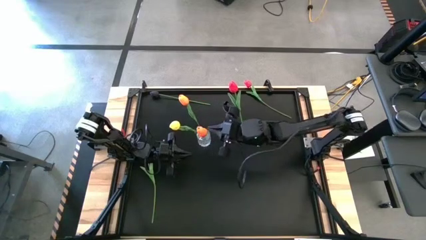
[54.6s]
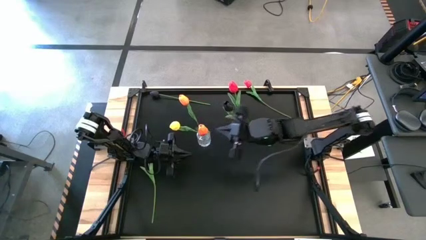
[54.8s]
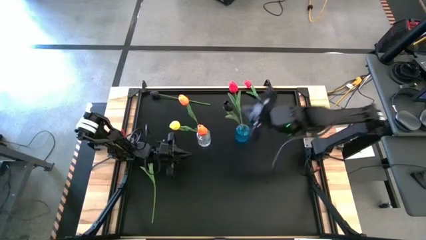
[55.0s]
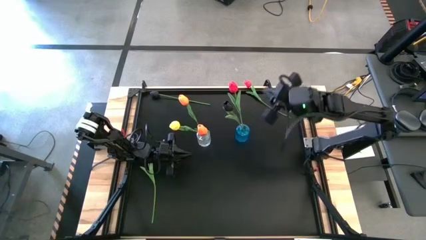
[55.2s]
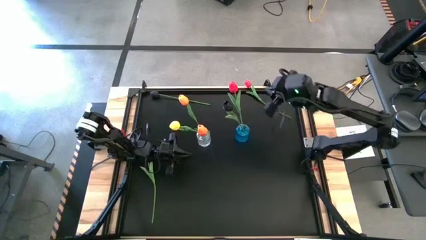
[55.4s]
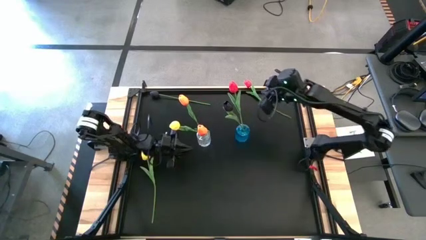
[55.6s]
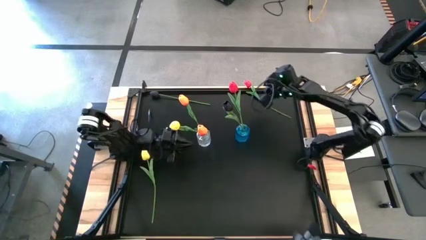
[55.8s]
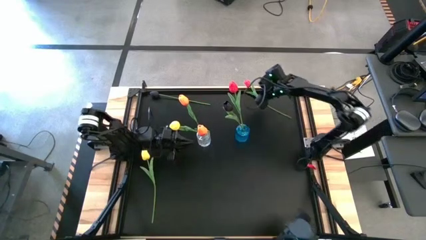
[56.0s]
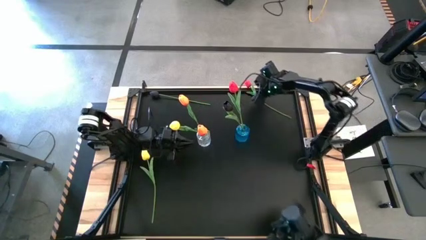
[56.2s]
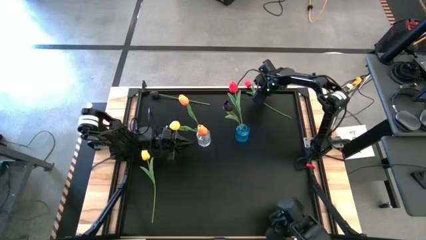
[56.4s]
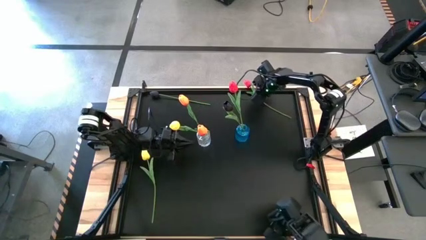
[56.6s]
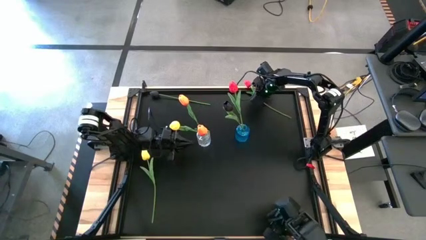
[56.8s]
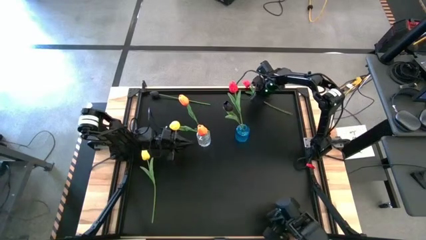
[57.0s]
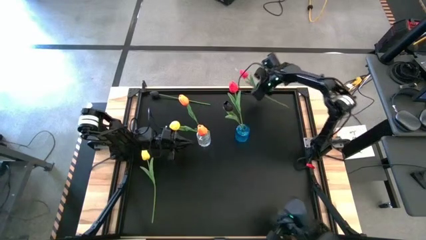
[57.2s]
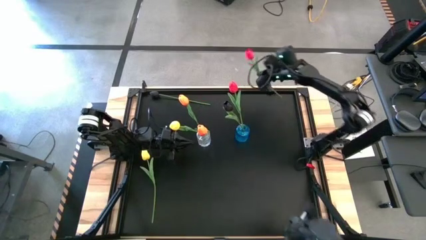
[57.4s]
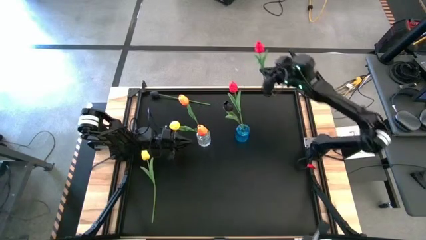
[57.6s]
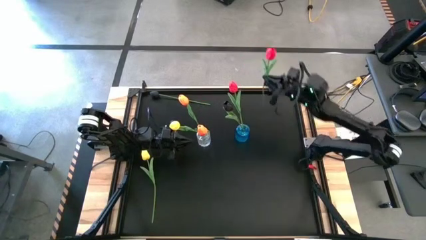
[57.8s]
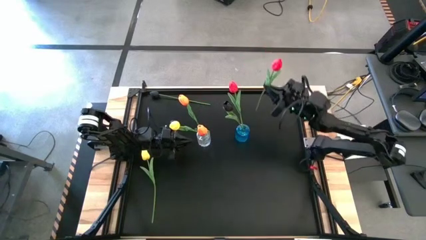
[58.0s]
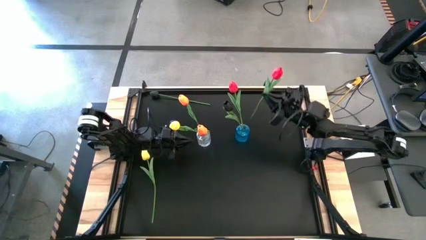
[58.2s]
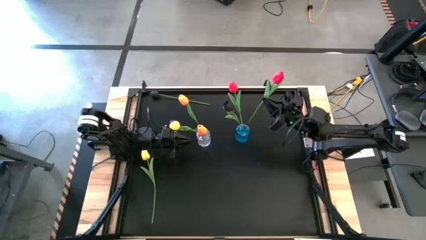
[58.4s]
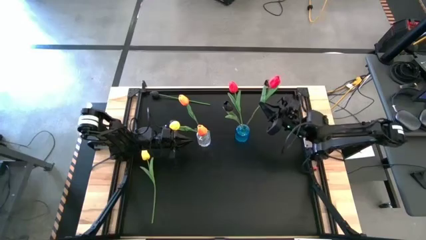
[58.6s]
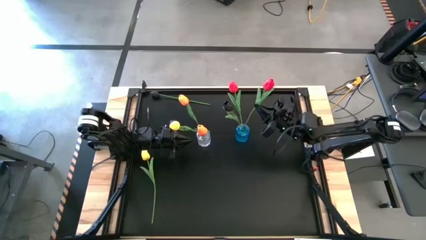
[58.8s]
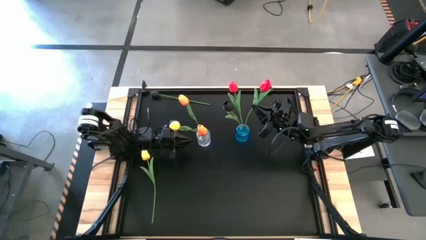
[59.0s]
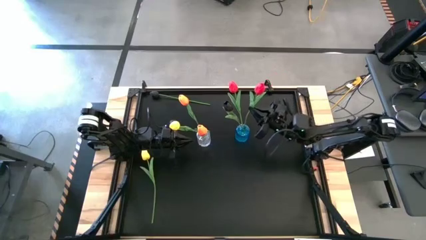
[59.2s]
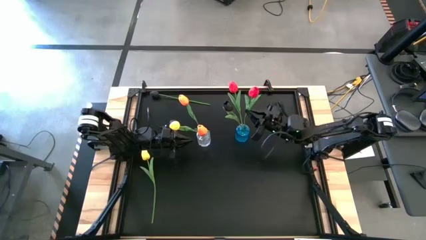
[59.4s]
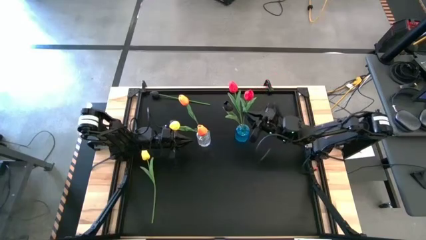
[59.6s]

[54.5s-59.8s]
Task: Sort flowers into vase by color
Put the red flower into the blue vase

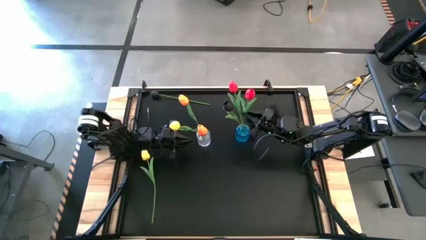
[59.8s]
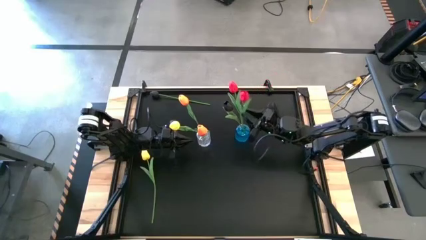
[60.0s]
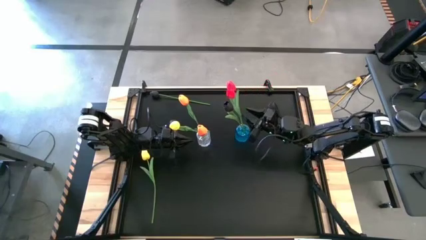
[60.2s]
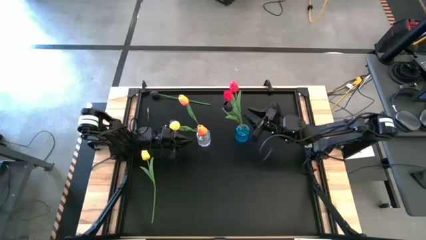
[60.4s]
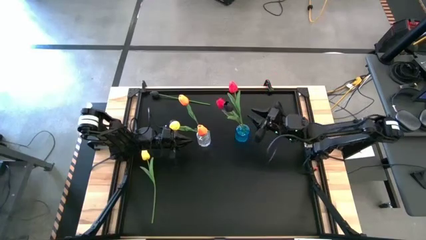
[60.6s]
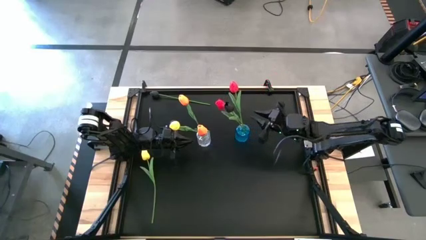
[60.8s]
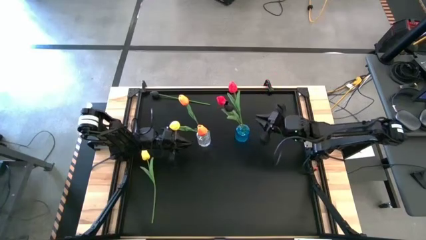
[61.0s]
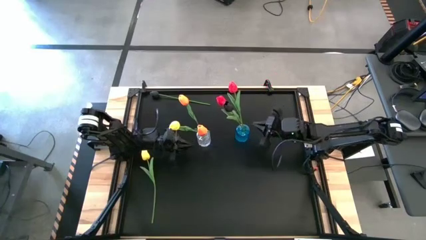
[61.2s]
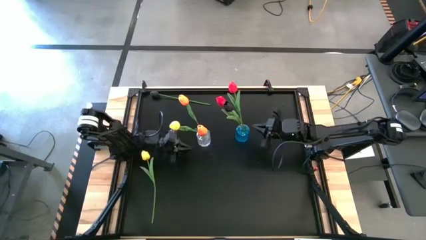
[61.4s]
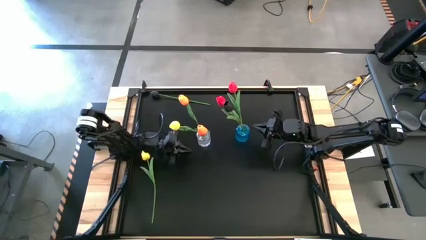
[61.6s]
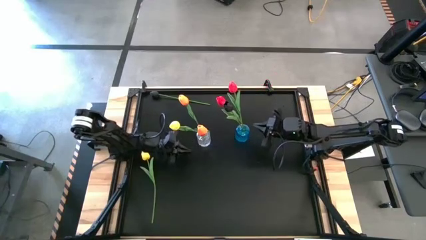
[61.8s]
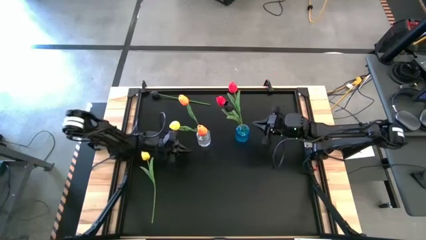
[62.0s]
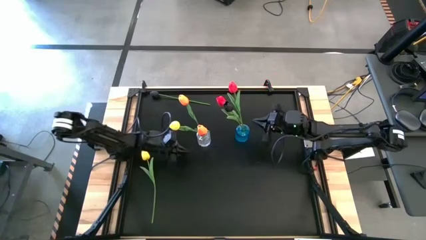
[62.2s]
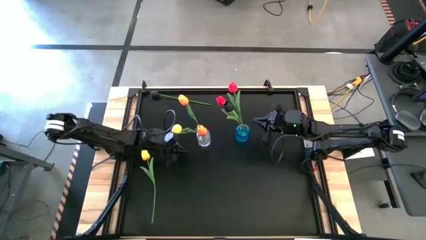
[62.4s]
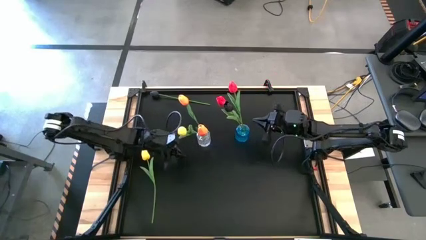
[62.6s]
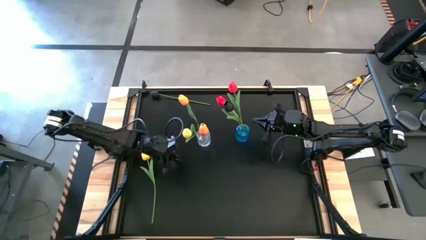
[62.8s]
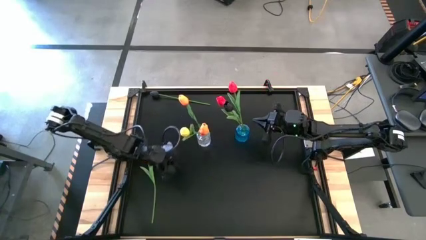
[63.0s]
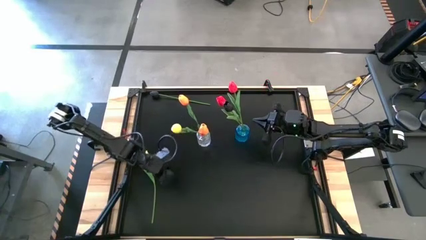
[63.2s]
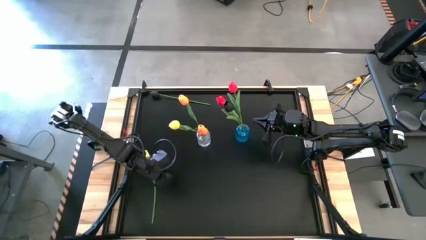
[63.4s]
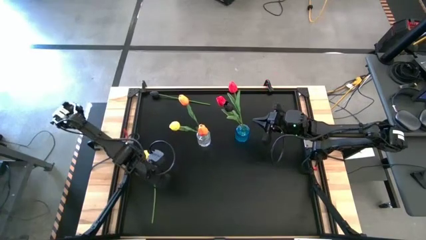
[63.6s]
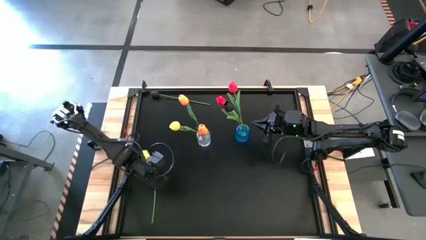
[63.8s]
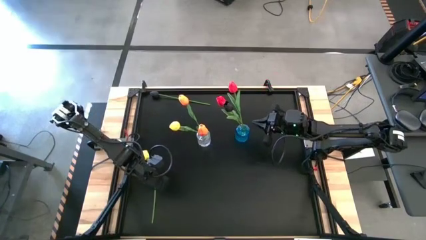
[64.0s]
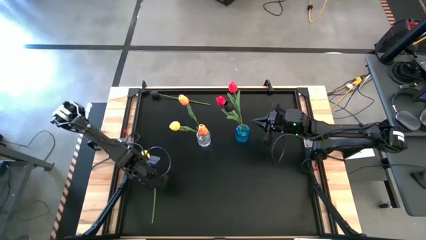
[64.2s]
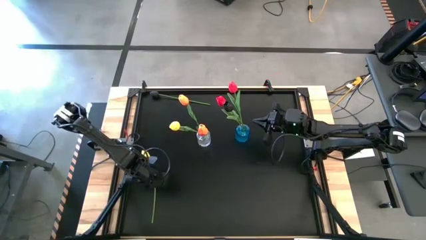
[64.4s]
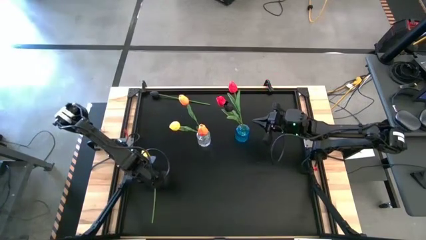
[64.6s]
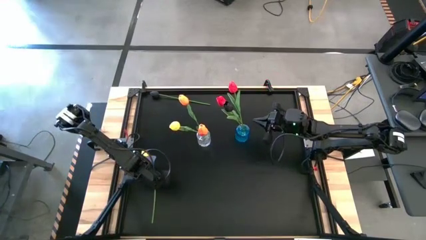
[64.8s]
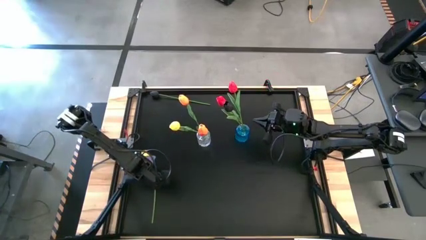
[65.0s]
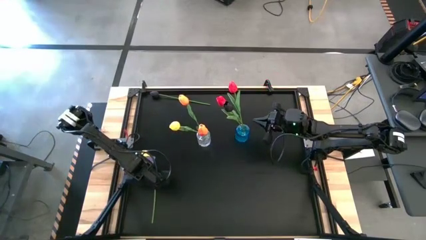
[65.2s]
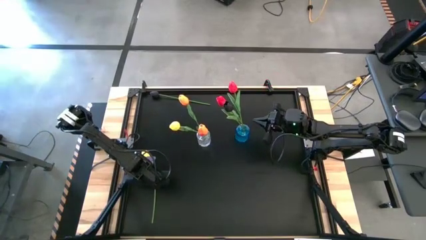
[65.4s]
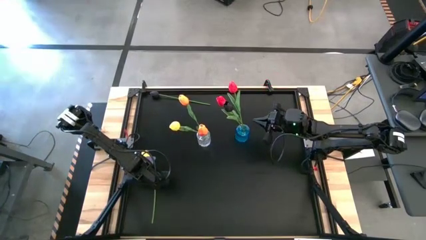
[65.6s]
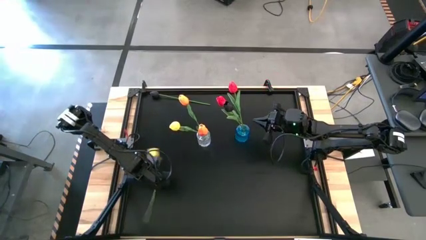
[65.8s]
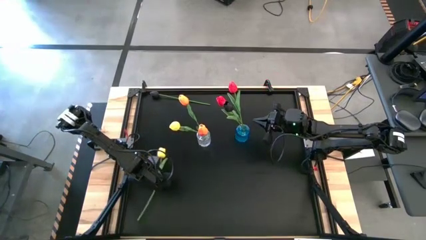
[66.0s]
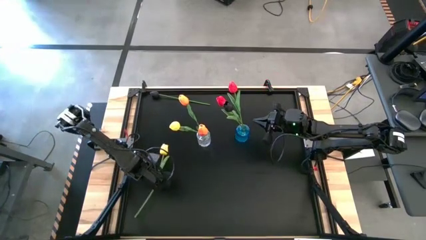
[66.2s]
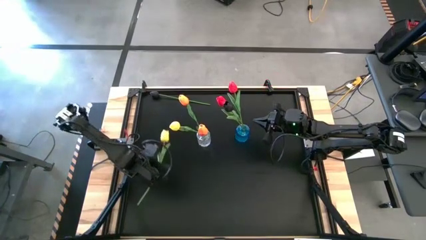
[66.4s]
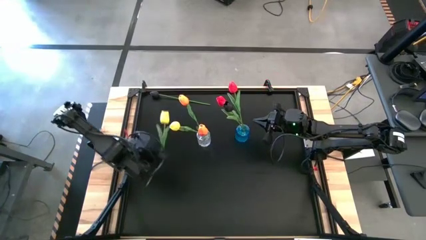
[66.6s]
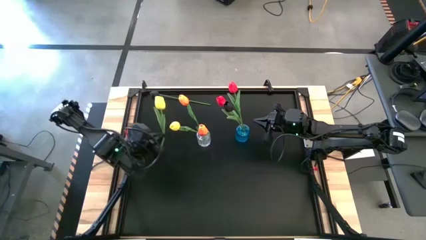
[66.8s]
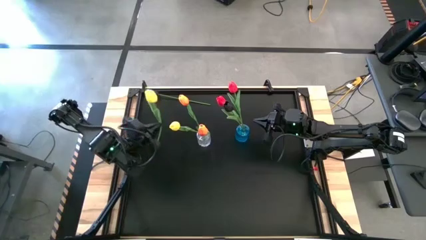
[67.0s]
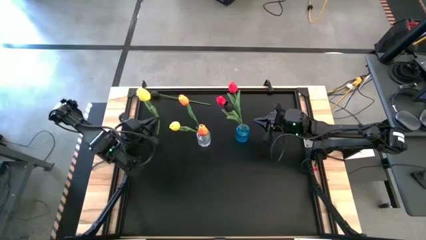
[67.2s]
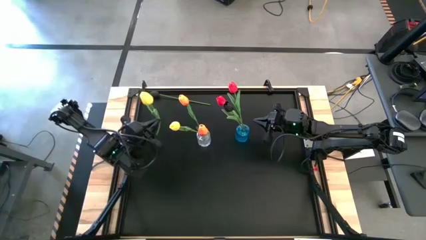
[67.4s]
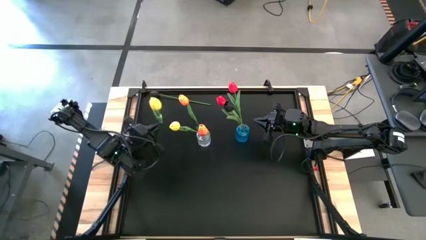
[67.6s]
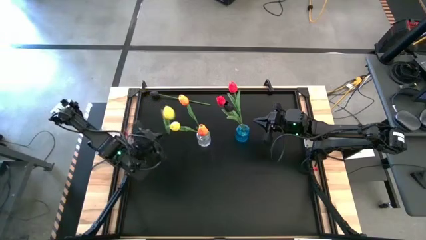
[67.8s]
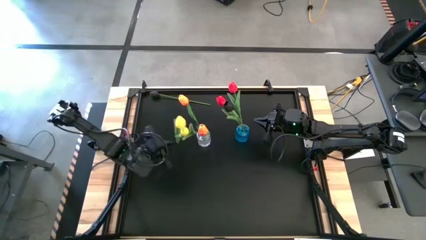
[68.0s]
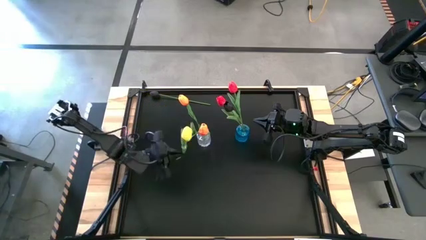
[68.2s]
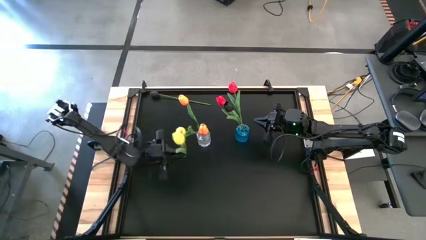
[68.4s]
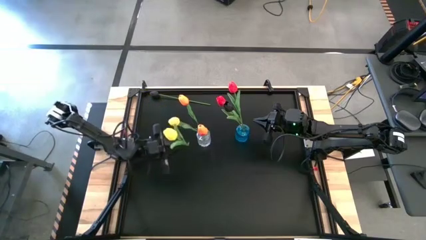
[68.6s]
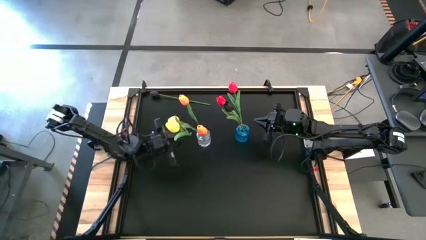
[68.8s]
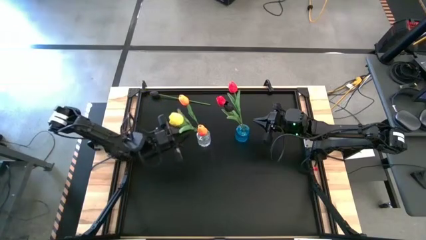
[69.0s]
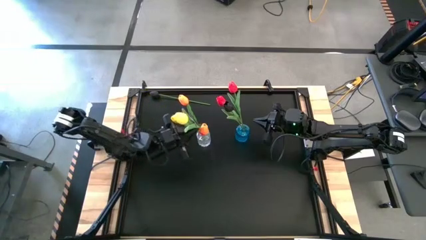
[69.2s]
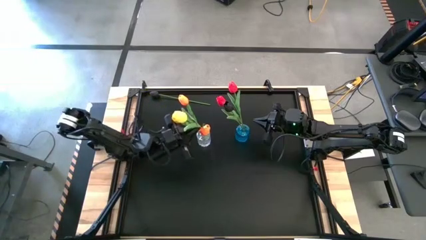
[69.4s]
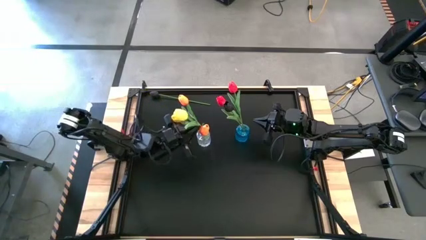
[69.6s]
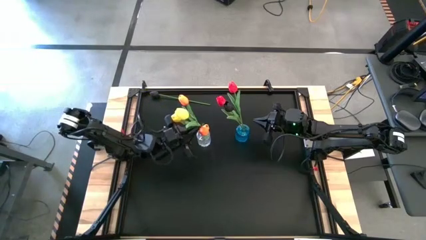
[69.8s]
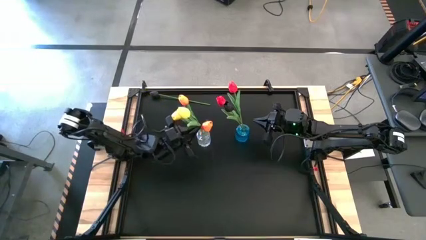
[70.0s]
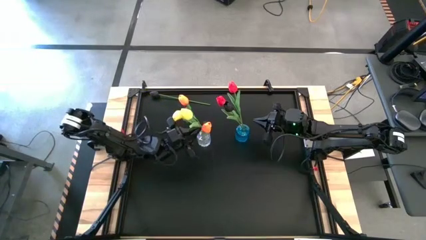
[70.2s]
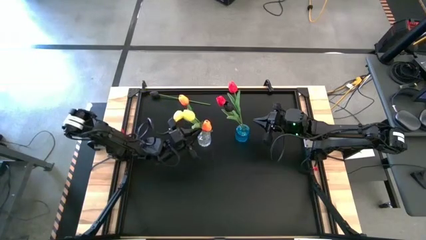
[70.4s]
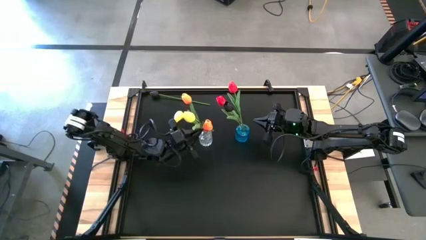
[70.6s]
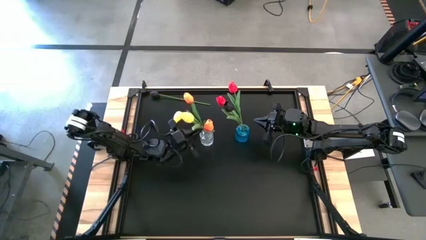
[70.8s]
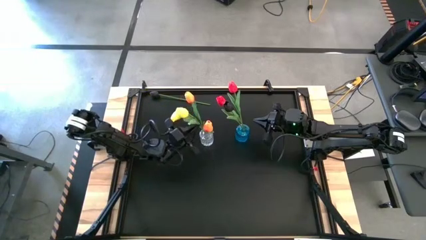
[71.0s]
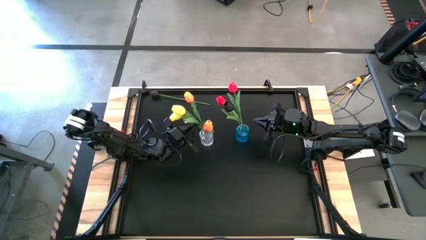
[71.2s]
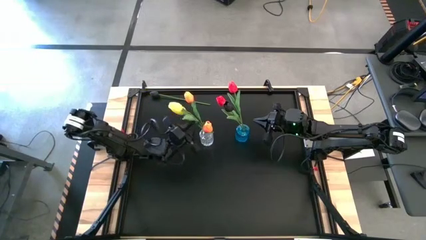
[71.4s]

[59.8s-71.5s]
Put the yellow flower into the transparent vase
